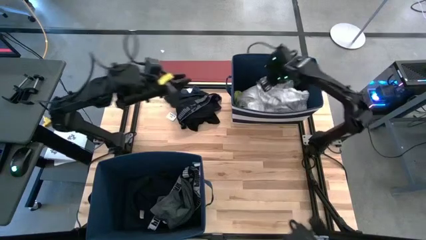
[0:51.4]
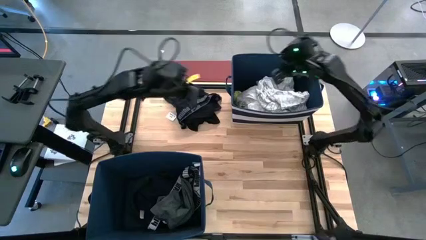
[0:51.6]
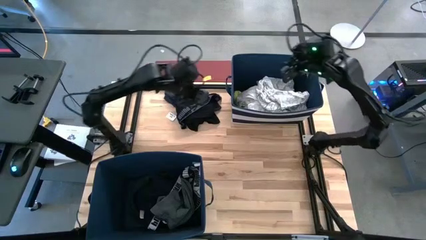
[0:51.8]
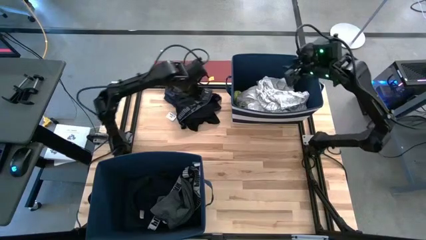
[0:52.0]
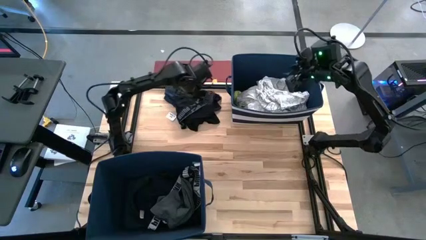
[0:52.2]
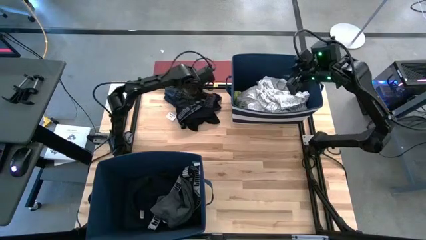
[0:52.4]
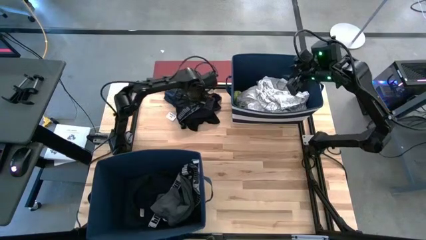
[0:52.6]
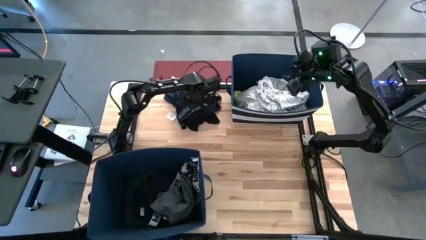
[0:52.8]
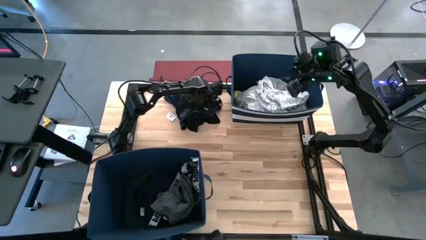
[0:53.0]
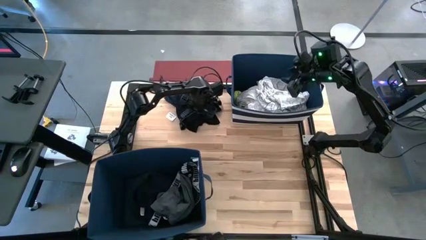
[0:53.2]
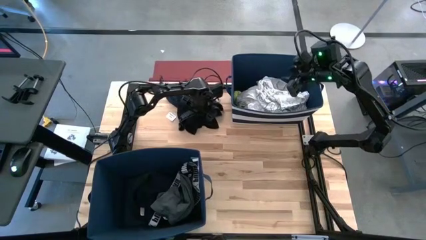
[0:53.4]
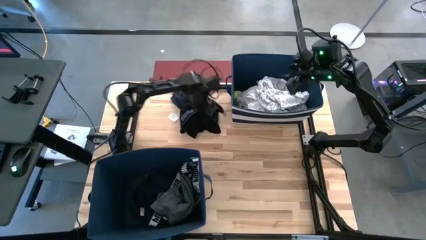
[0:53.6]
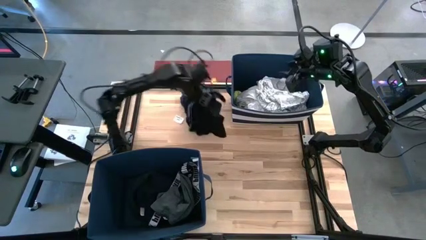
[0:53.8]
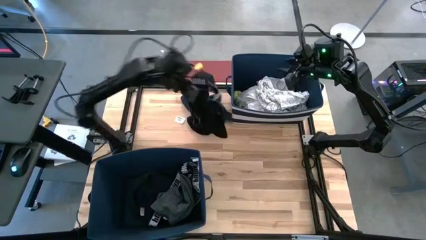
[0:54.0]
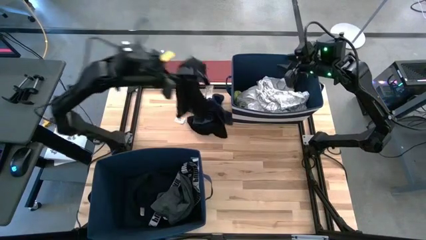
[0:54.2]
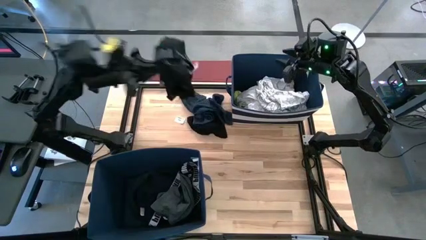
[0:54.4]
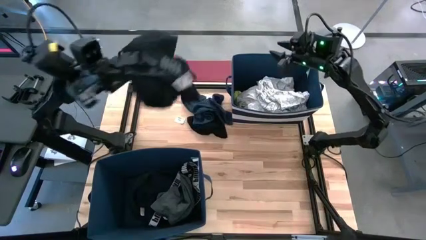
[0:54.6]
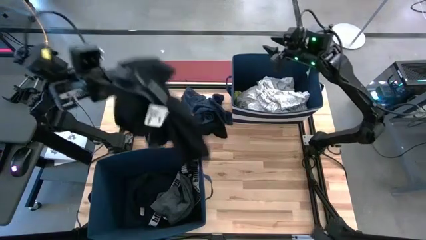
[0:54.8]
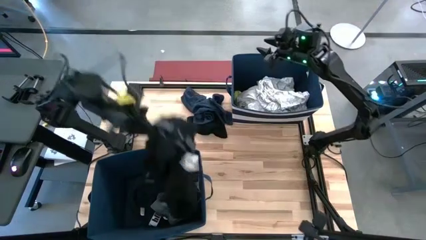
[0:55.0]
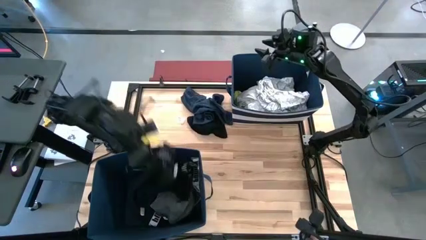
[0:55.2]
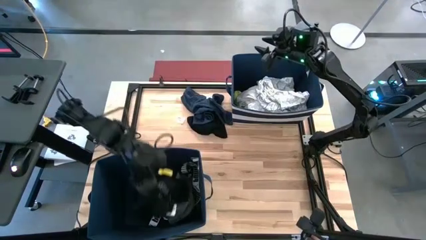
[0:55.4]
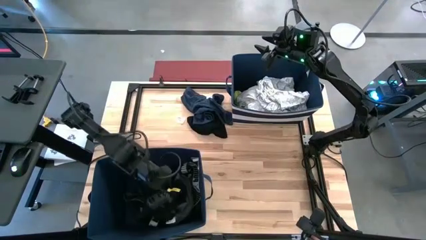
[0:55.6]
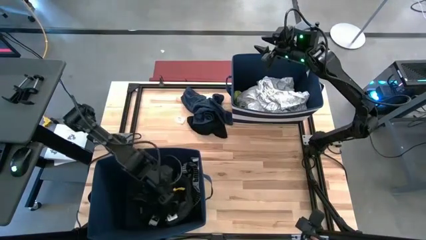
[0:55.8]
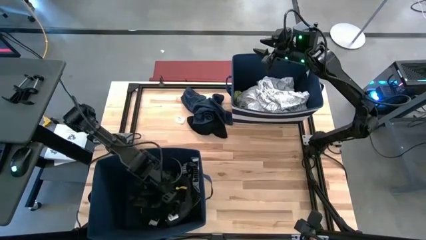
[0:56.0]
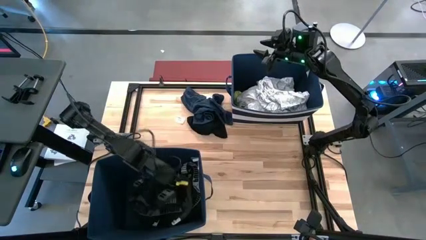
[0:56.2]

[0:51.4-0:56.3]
Task: Sort clothes
Put the black boxer shorts into the bottom blue laundry bin

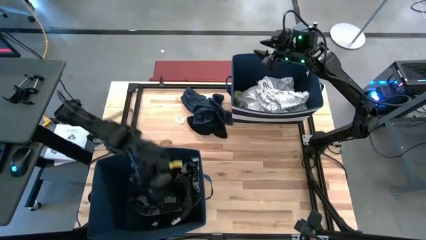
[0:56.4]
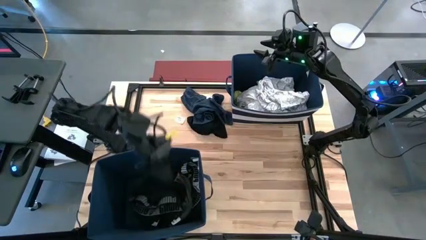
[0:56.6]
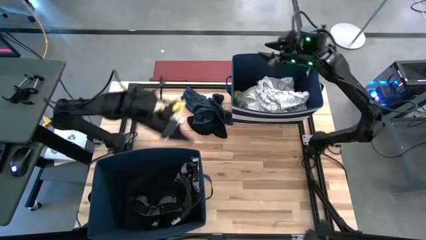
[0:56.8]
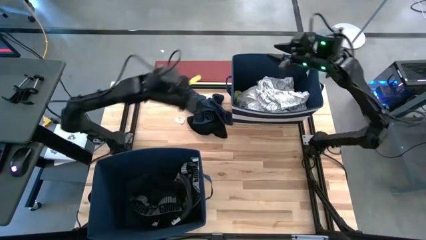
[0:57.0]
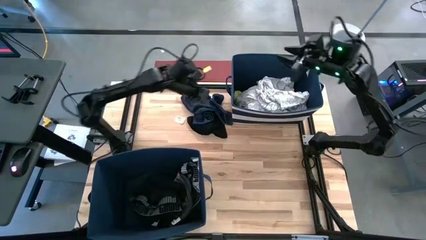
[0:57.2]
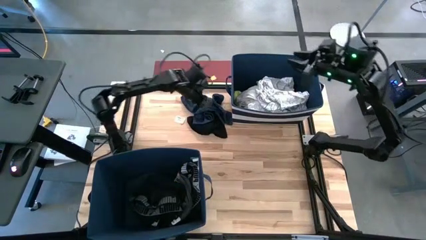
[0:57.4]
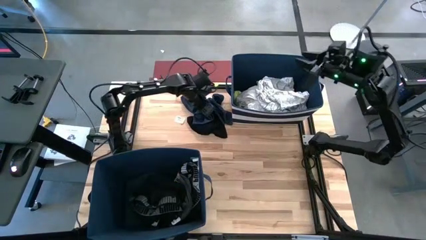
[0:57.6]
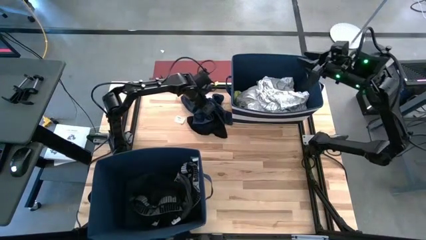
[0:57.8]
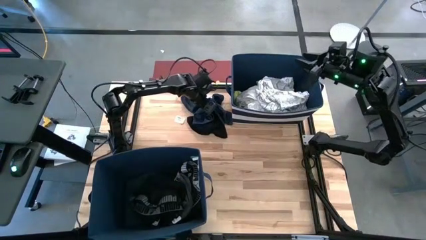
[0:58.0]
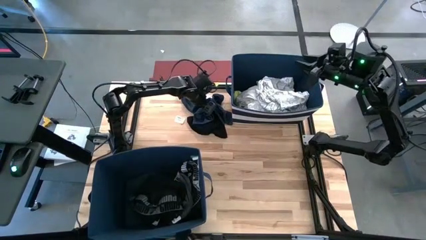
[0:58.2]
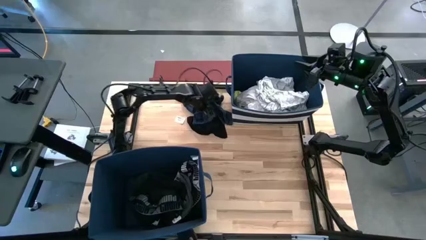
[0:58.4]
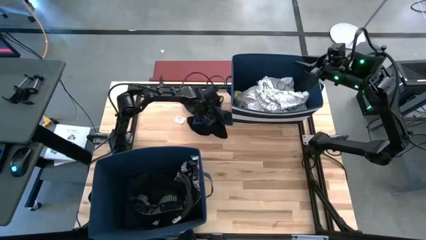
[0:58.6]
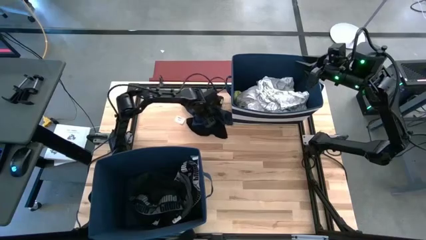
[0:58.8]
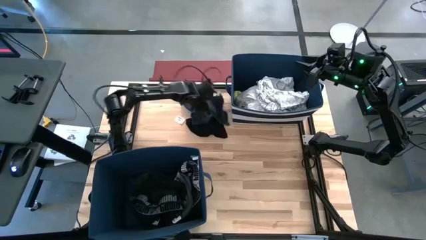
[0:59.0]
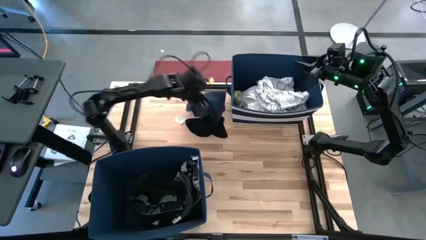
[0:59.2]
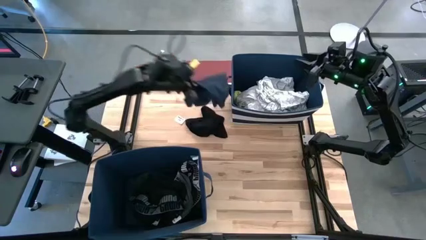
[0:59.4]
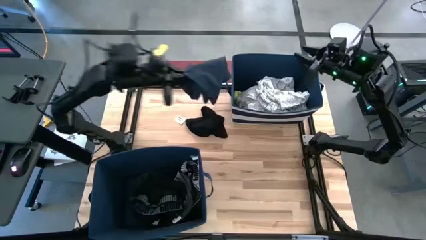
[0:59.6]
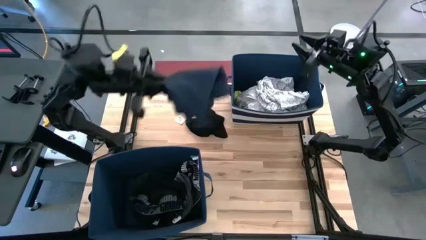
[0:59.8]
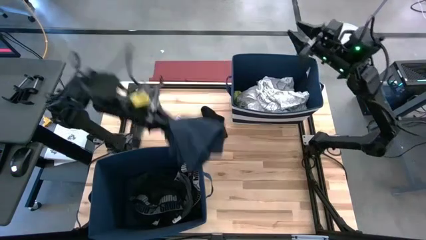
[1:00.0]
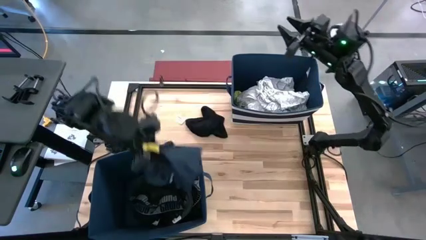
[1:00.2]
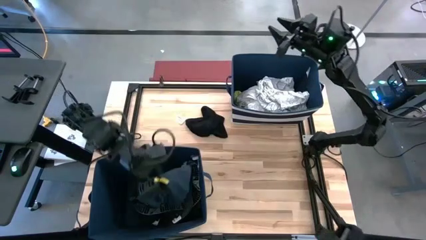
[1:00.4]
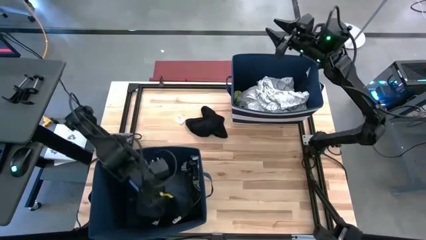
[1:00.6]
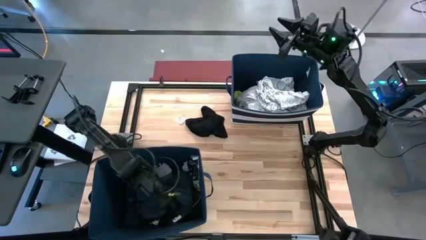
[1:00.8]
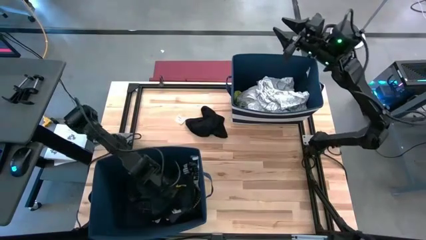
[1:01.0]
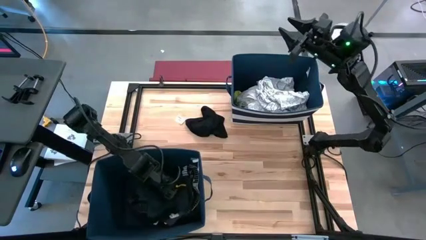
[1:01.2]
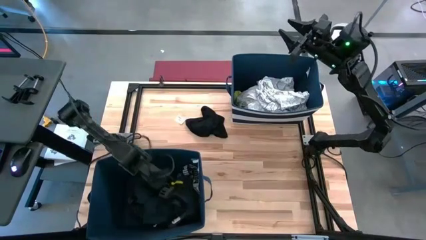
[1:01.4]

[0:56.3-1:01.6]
Put the dark blue underwear into the bottom blue laundry bin

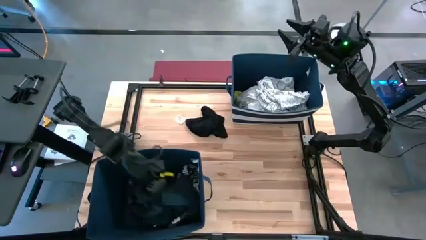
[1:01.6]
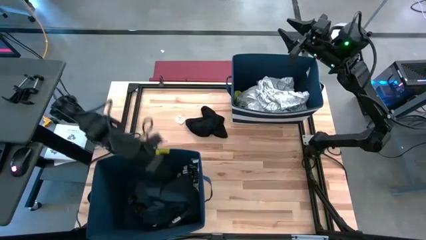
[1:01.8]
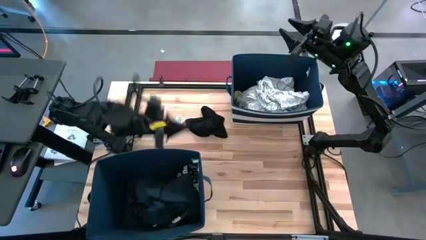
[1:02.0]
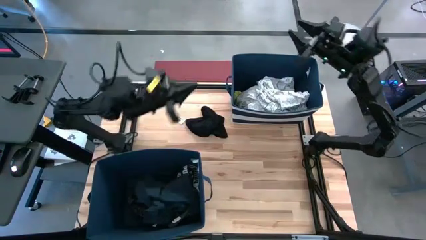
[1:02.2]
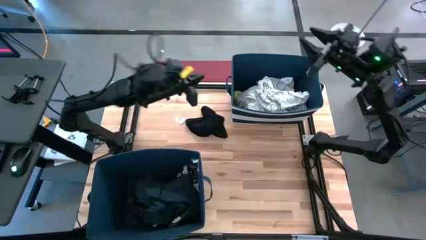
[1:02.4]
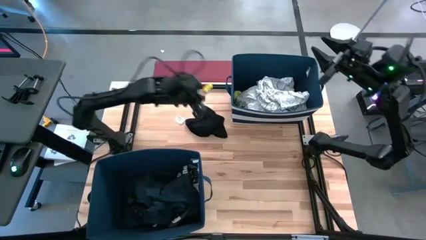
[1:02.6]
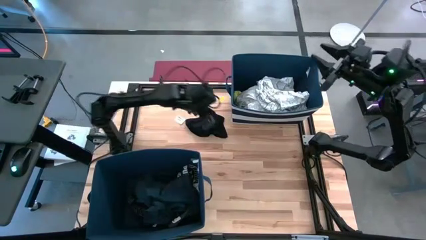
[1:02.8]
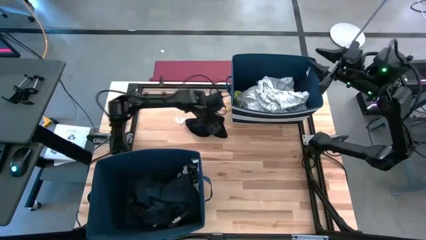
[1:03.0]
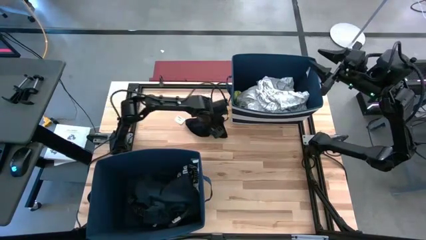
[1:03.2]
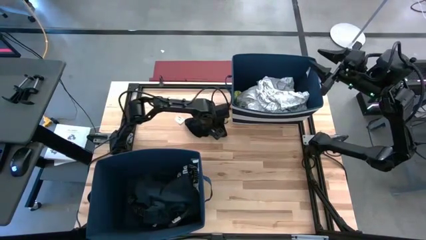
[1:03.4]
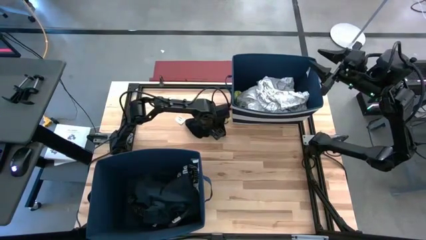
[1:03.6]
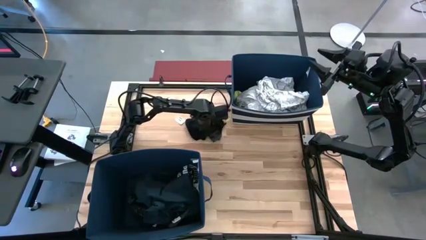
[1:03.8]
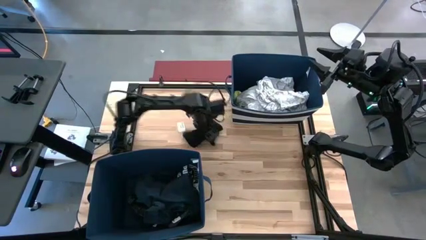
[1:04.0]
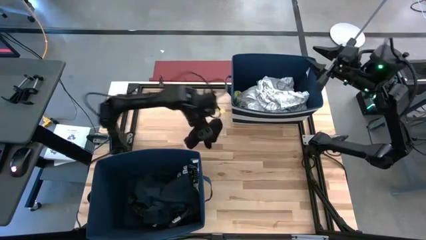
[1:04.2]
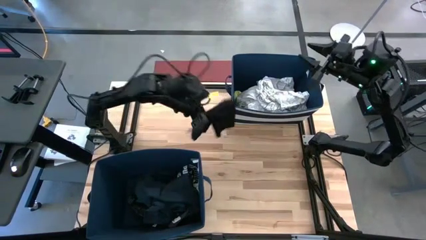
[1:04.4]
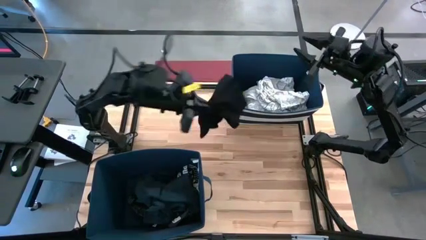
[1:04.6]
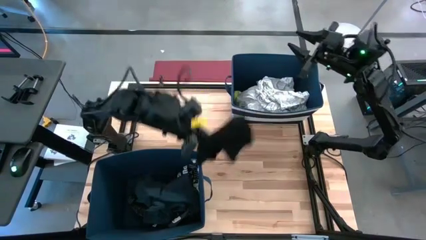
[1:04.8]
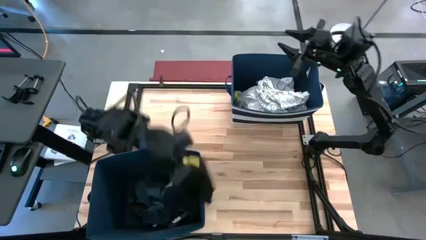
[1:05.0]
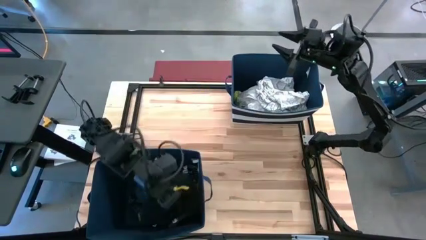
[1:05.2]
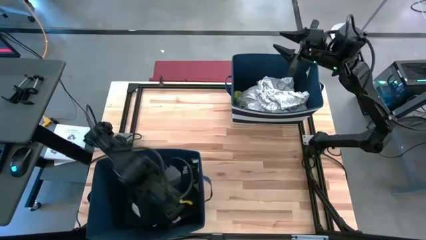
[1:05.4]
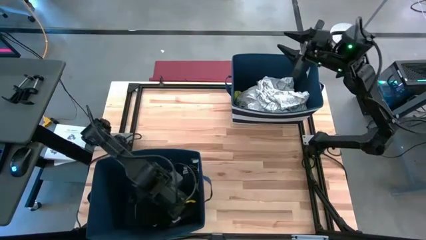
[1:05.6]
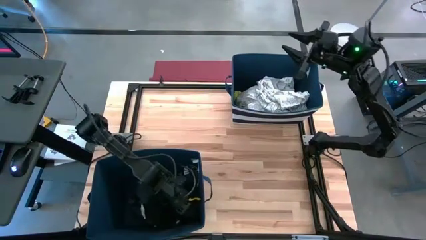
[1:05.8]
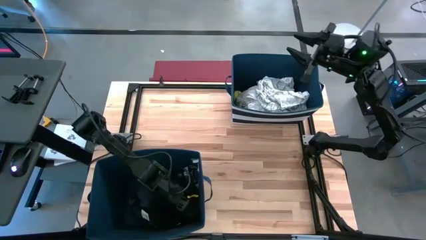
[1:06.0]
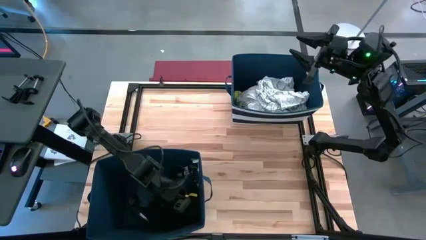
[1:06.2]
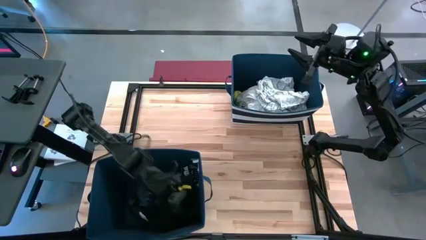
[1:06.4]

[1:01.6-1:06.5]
Put the black underwear shorts into the bottom blue laundry bin

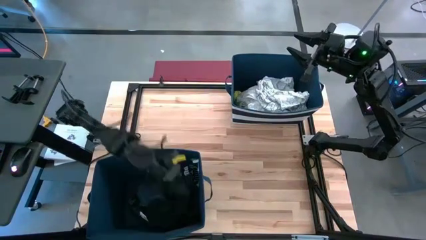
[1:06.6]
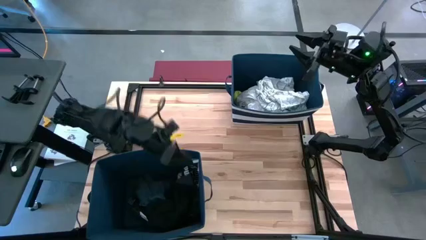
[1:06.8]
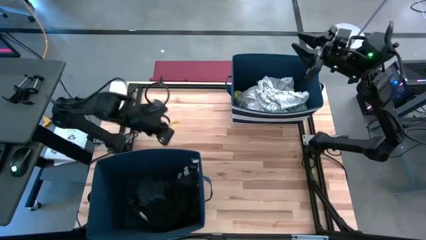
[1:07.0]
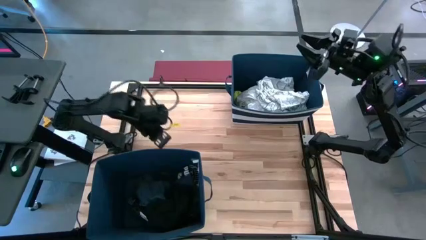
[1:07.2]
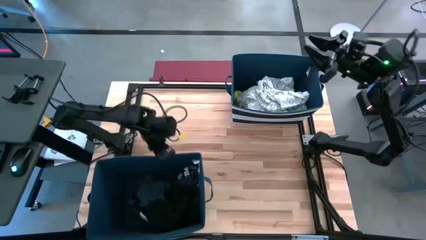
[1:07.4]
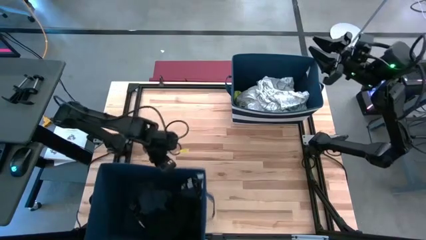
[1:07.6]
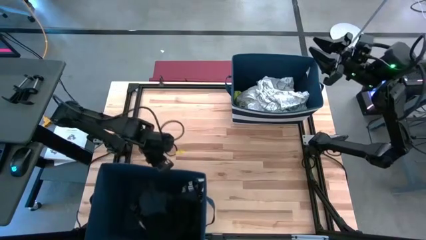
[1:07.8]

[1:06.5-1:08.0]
Adjust the bottom laundry bin

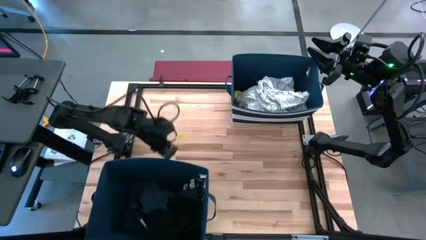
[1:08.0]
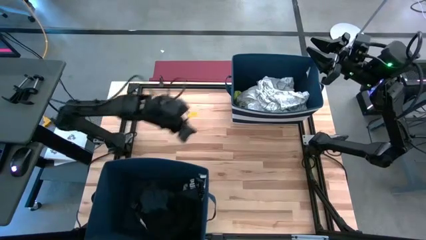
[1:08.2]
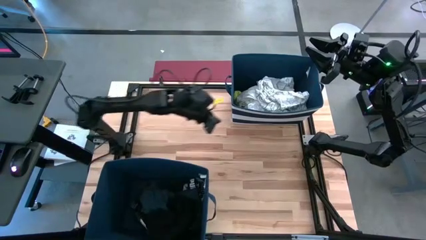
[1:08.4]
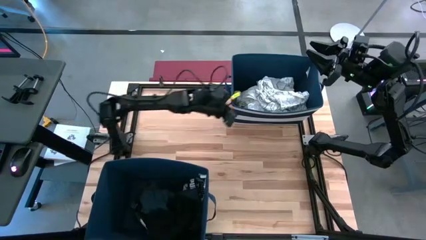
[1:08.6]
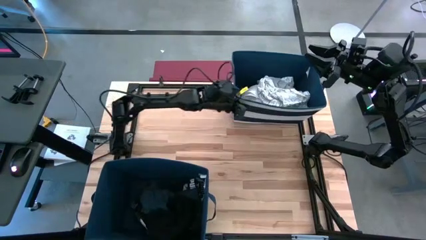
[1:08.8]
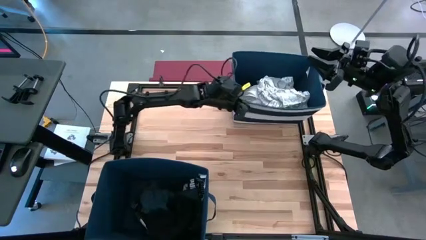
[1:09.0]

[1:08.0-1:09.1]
Adjust the top laundry bin
